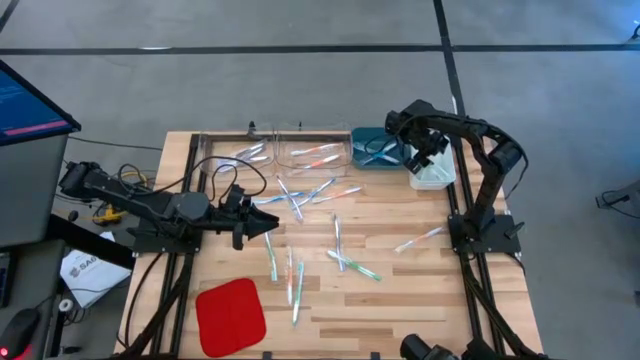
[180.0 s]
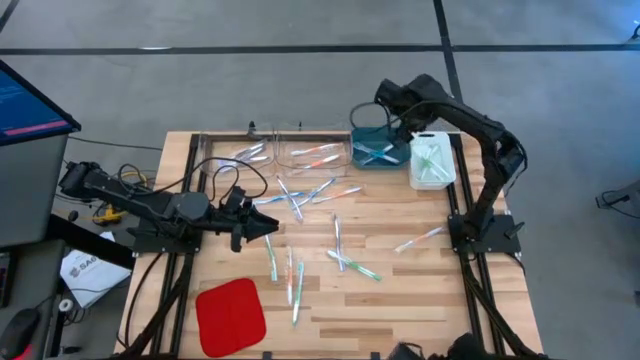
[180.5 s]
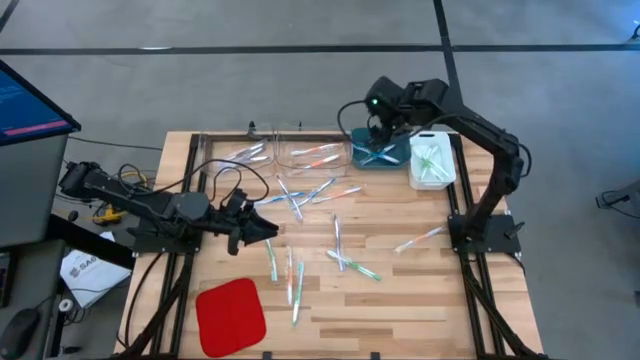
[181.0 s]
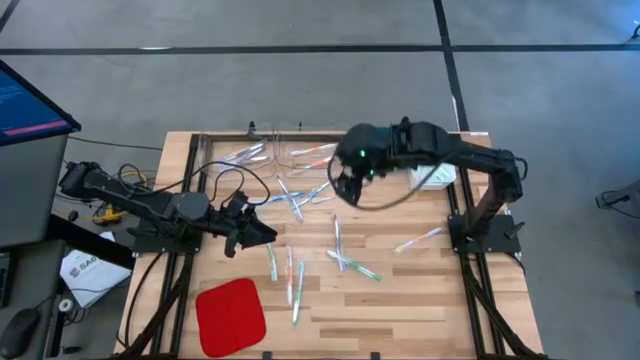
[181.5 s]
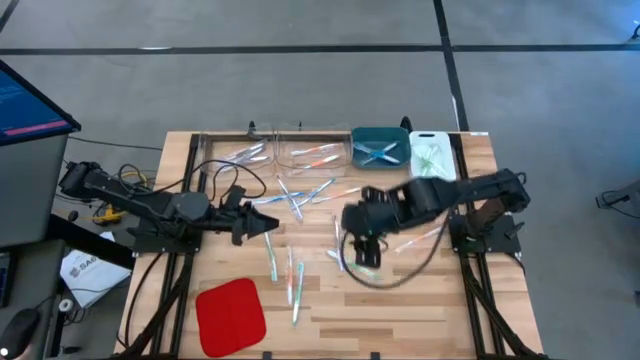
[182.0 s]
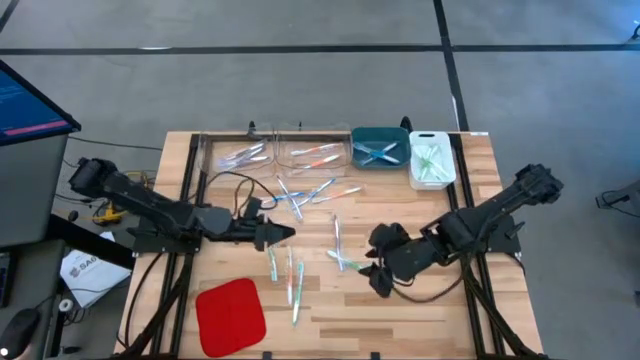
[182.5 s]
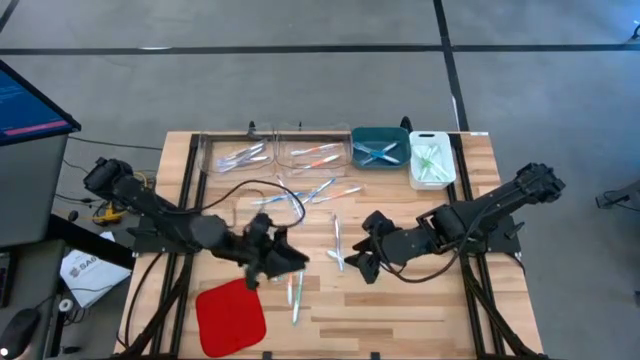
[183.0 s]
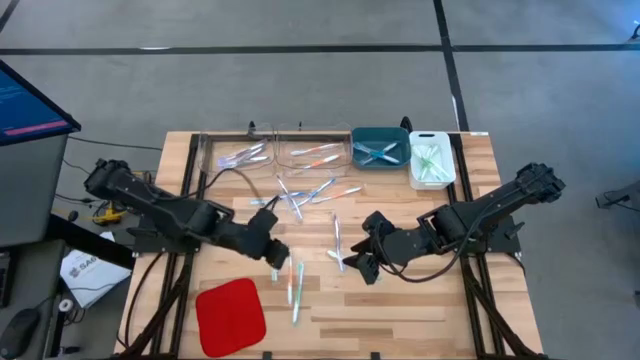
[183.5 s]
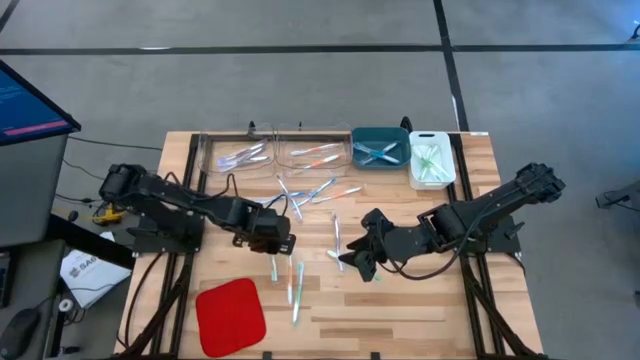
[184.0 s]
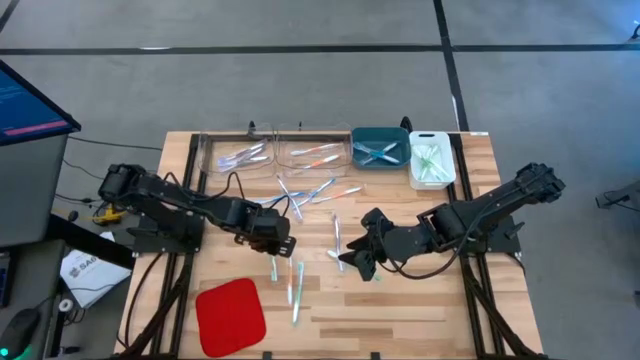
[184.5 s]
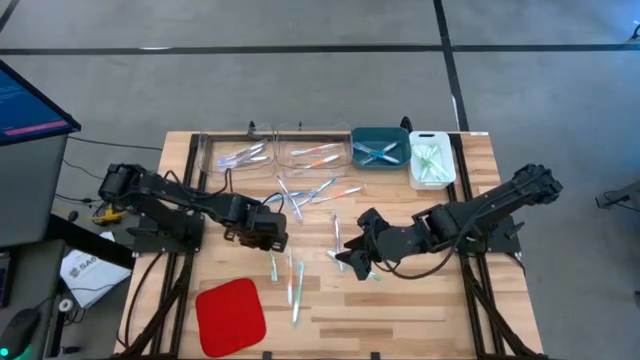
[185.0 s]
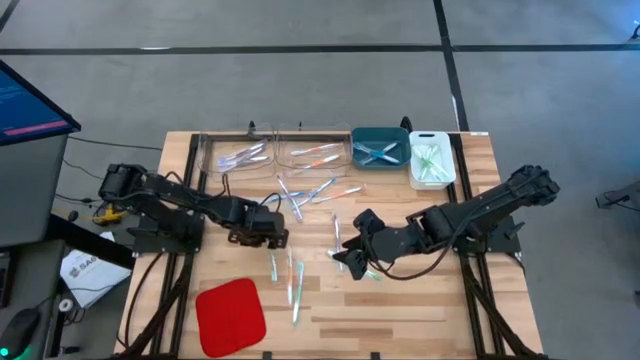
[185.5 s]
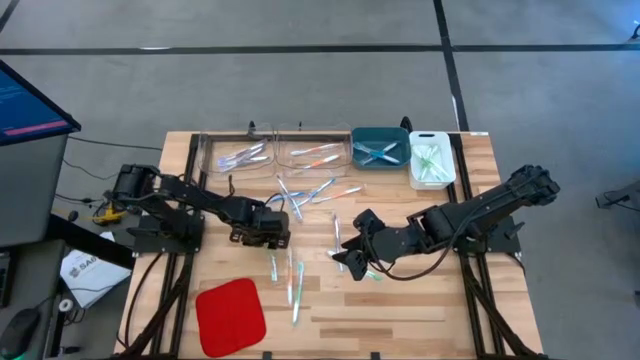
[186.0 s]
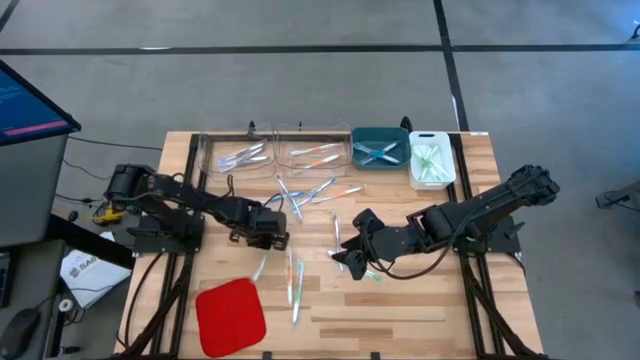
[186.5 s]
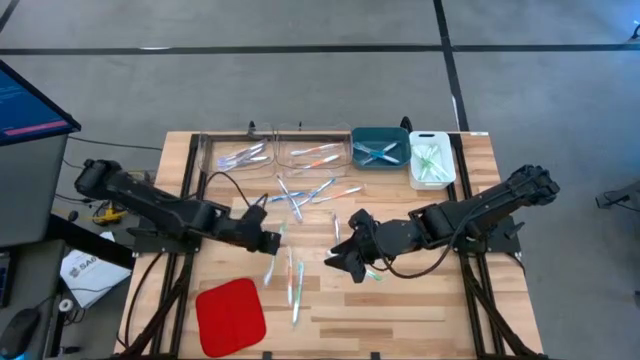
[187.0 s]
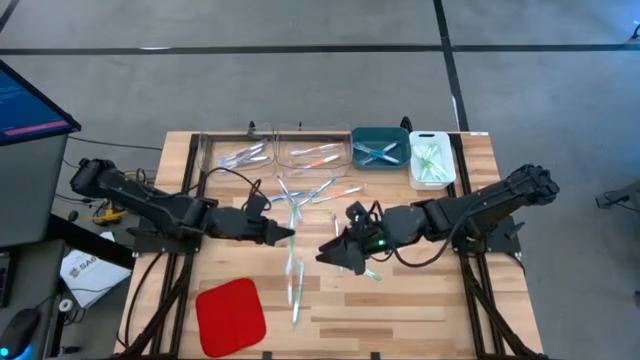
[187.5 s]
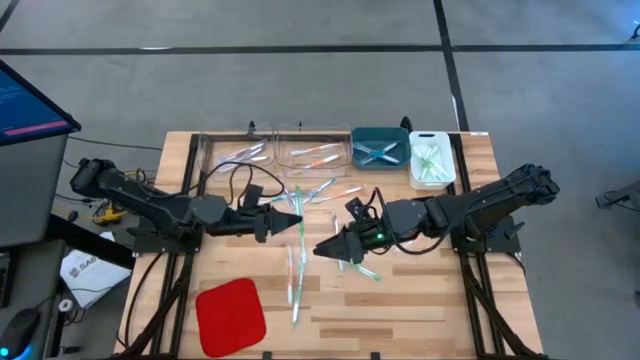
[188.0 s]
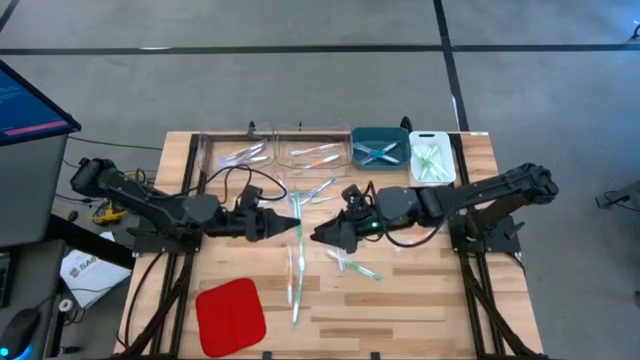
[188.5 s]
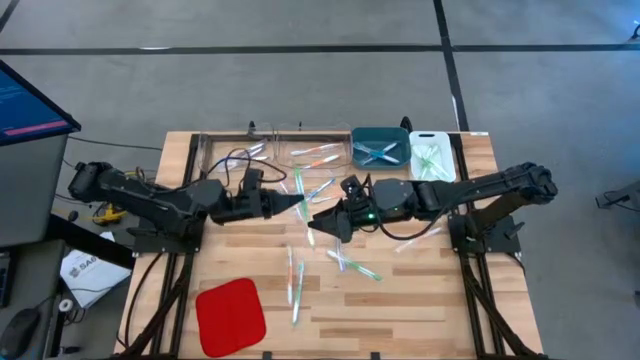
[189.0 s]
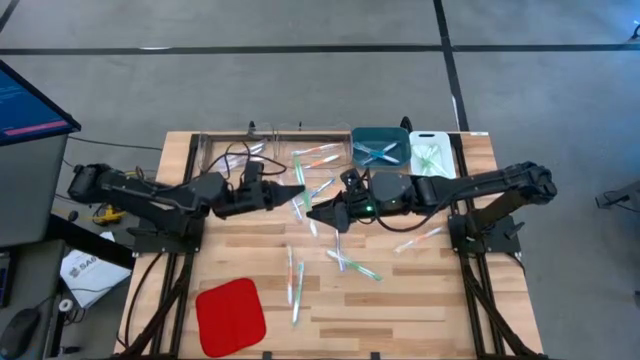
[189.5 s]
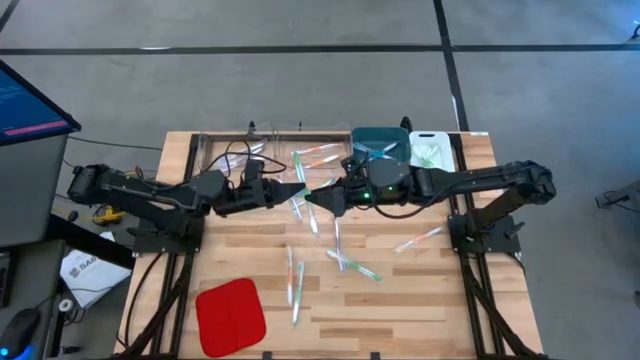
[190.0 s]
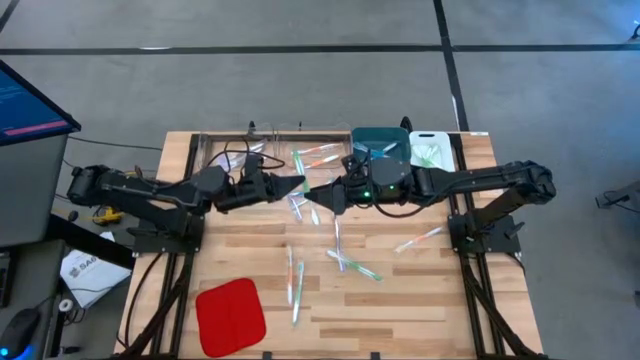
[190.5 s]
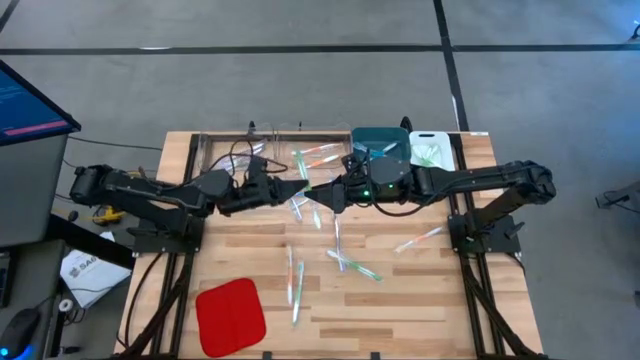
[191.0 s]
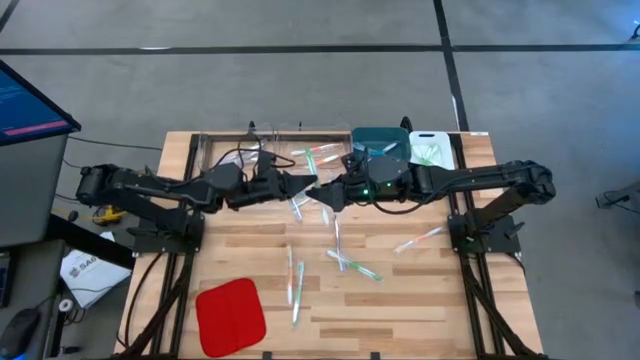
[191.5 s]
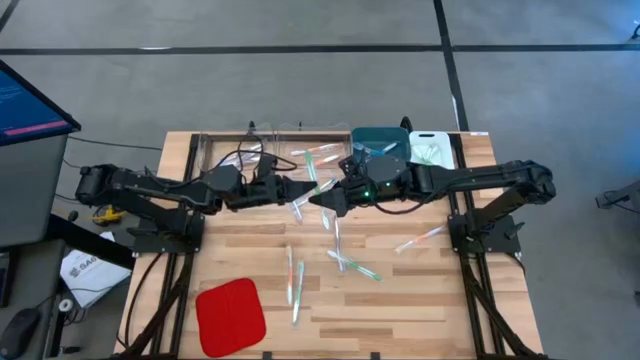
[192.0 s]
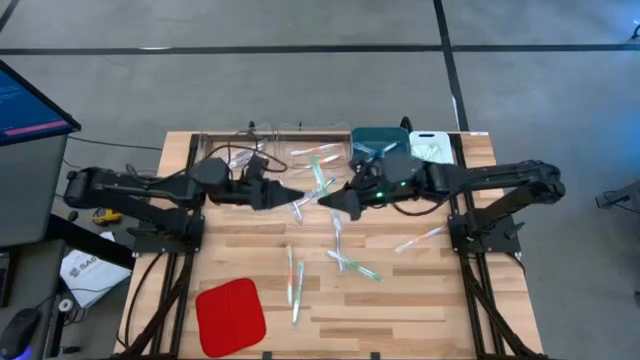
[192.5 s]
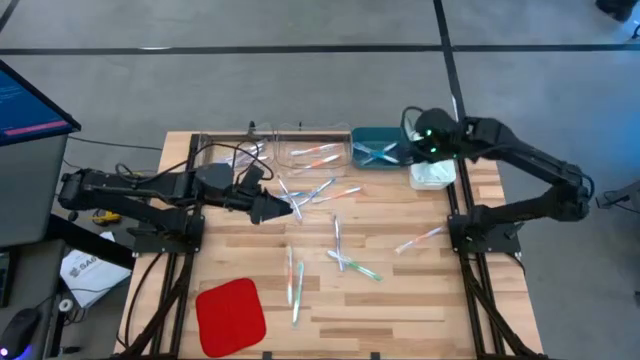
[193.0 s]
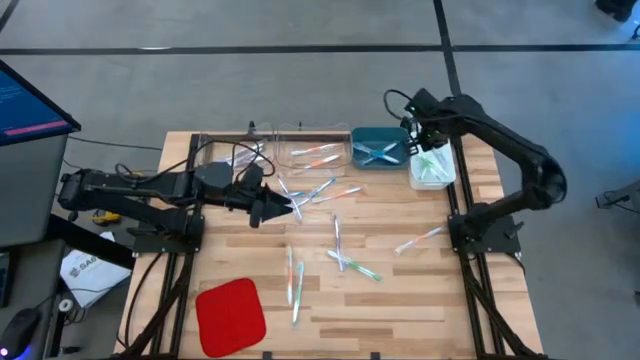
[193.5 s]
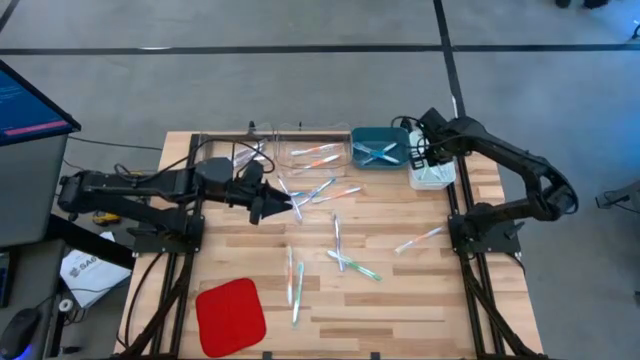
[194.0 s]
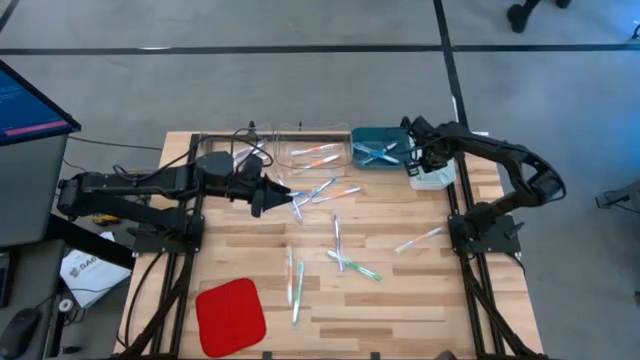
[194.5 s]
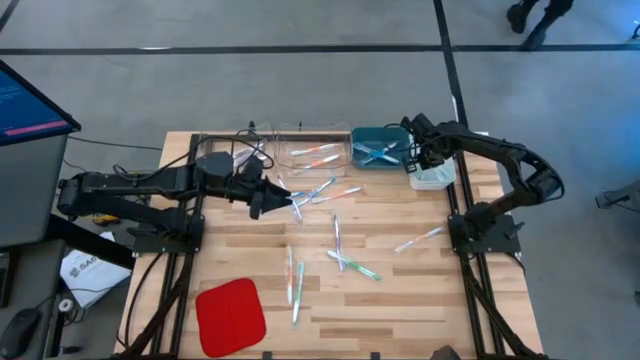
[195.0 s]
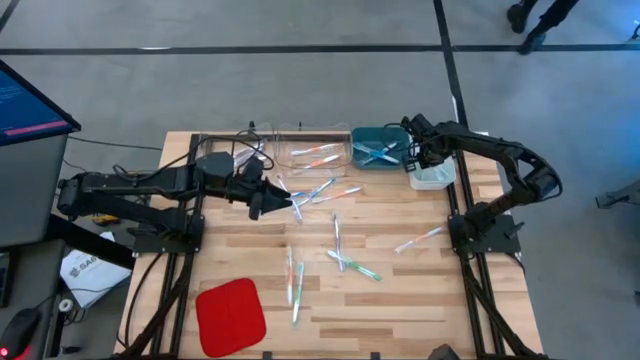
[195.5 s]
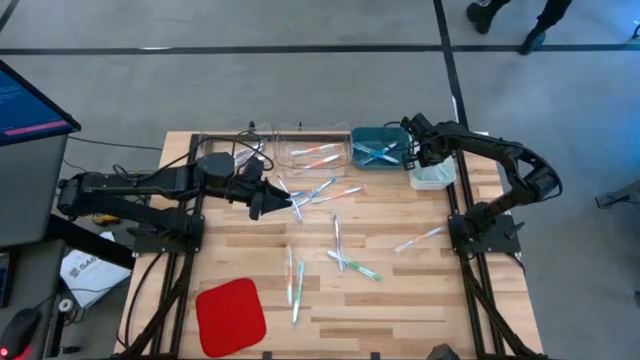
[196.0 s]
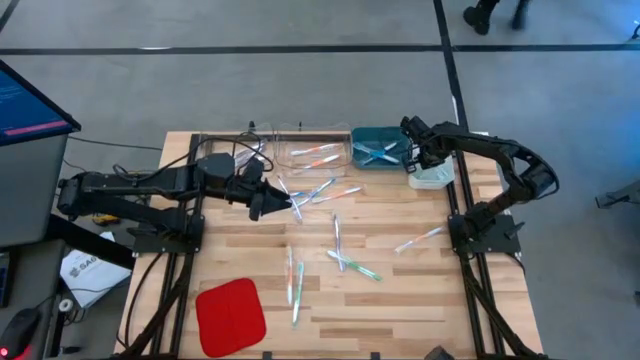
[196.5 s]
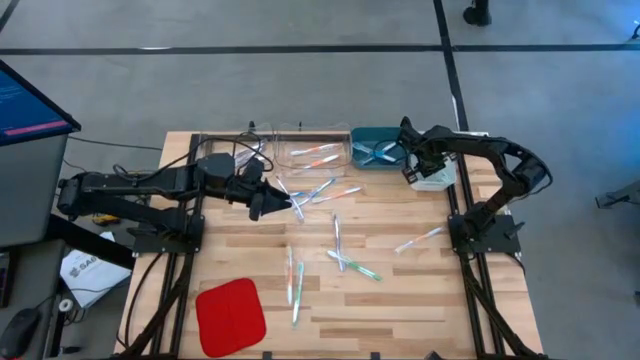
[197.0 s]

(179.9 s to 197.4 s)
Task: Pick & Place Toothbrushes
Put the green toothbrush into the white bin

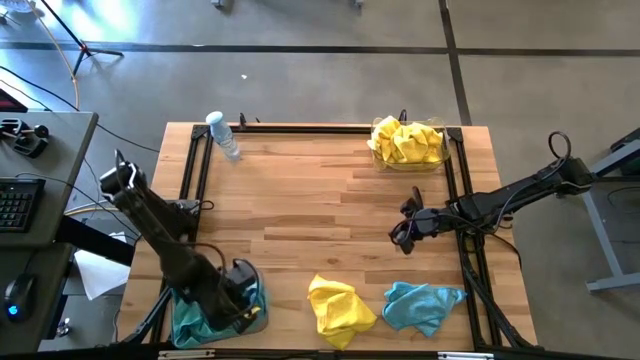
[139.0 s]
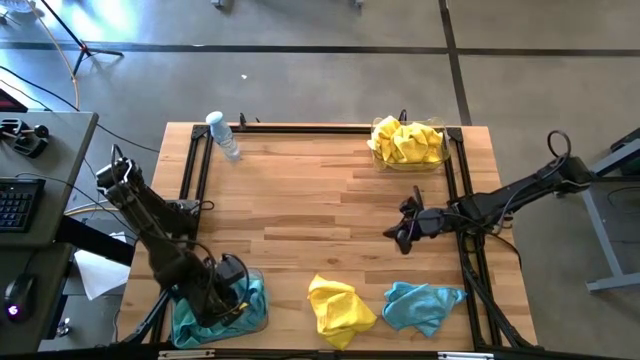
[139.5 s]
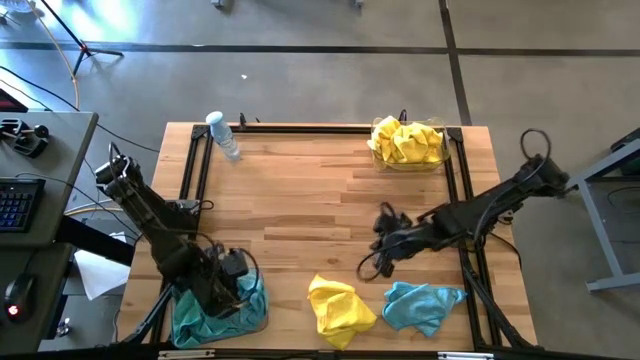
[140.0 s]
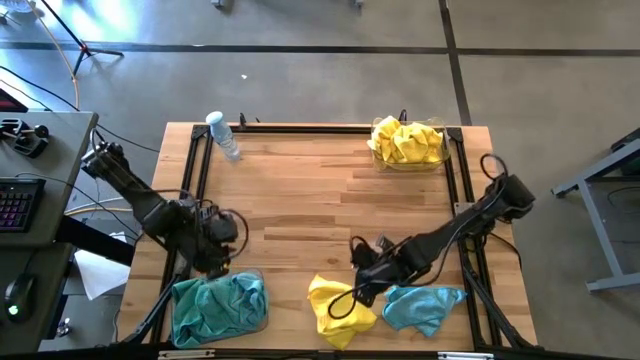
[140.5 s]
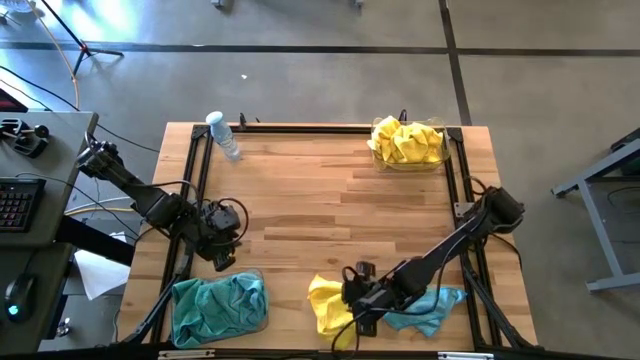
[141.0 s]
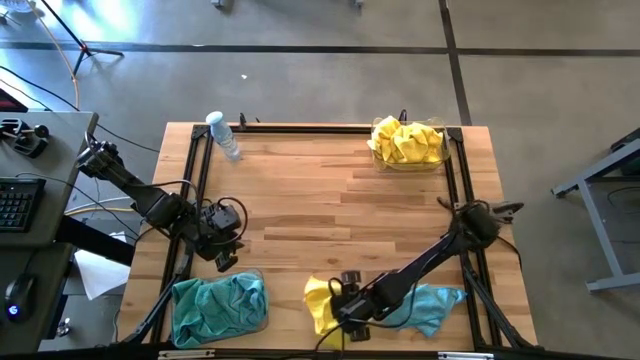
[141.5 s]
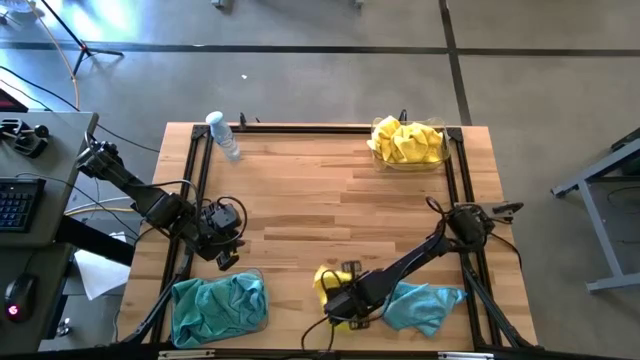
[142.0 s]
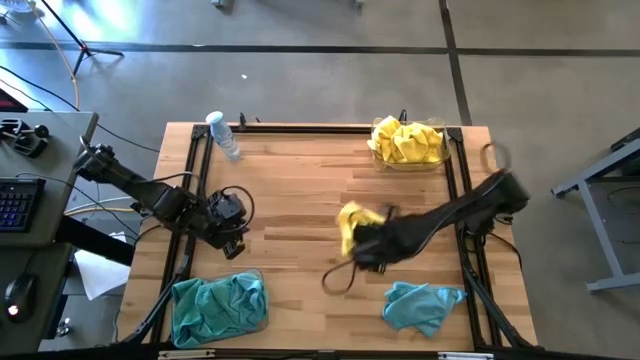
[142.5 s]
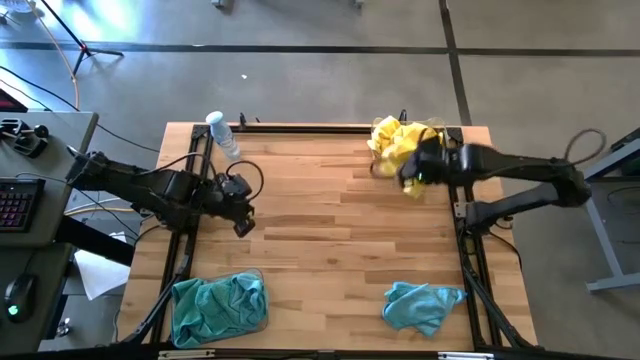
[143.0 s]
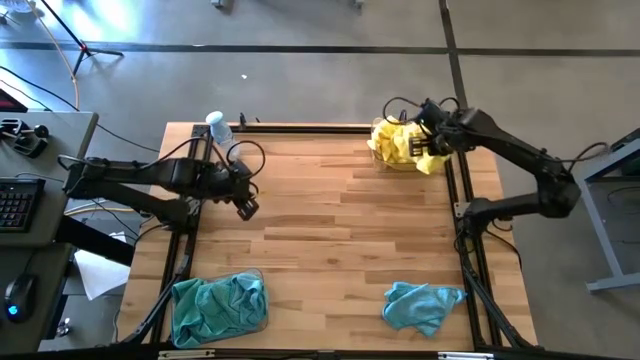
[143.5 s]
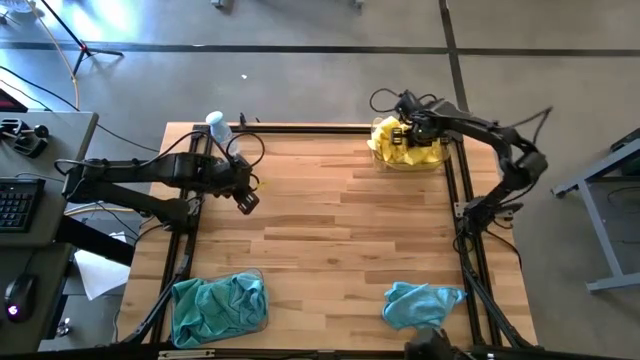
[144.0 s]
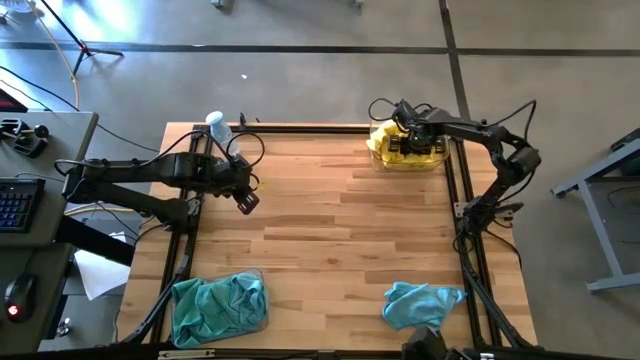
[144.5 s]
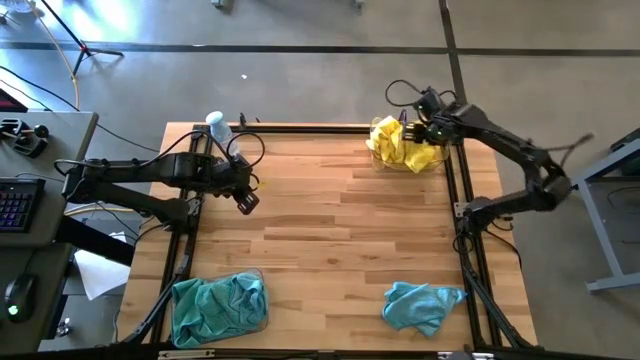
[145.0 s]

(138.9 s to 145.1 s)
Task: Sort microfiber towel by color & place in baskets
Put the yellow microfiber towel into the top transparent bin
